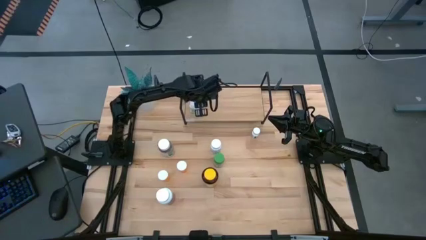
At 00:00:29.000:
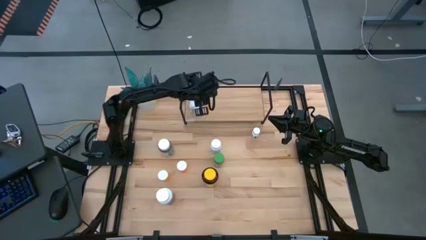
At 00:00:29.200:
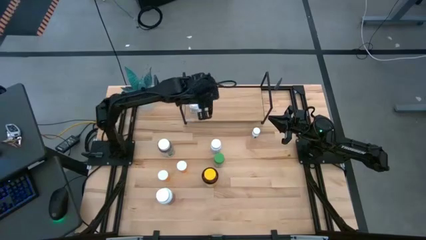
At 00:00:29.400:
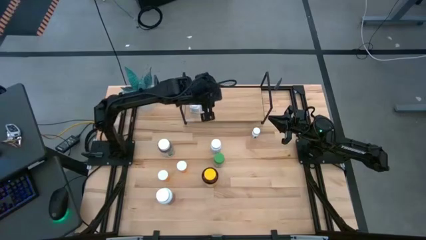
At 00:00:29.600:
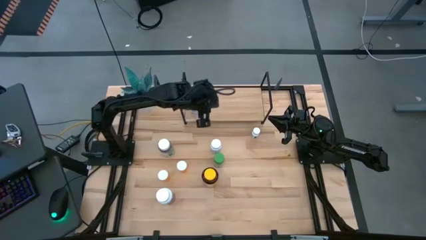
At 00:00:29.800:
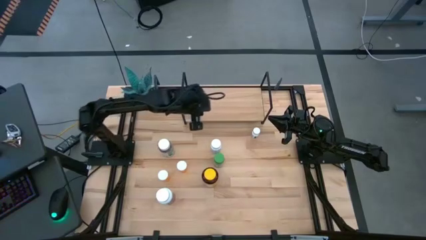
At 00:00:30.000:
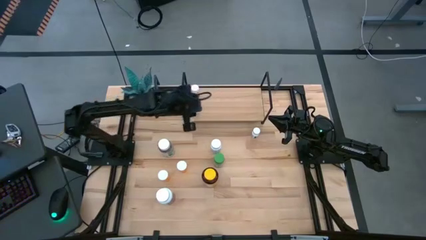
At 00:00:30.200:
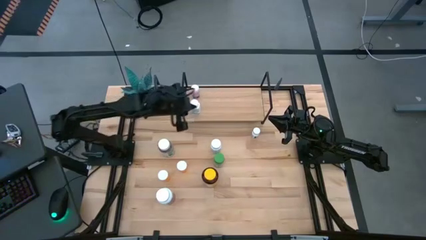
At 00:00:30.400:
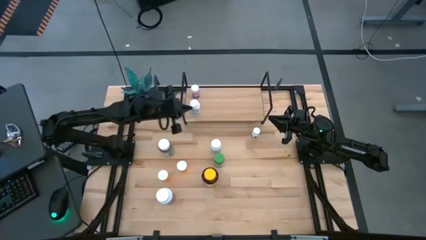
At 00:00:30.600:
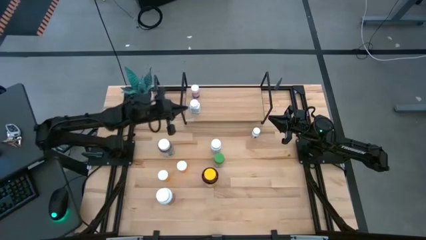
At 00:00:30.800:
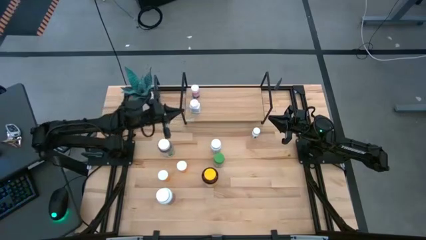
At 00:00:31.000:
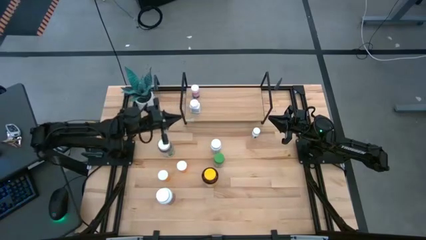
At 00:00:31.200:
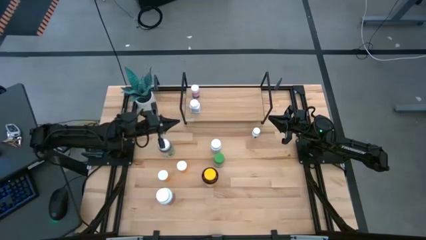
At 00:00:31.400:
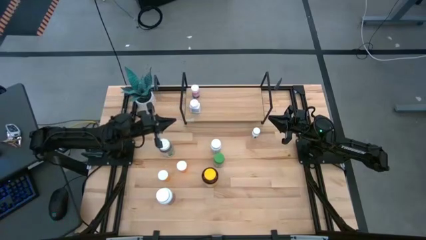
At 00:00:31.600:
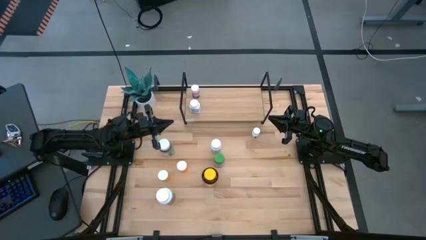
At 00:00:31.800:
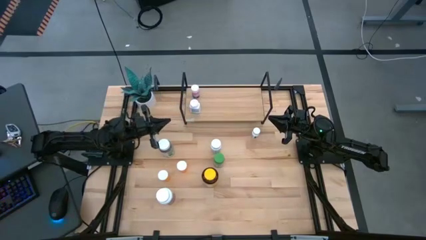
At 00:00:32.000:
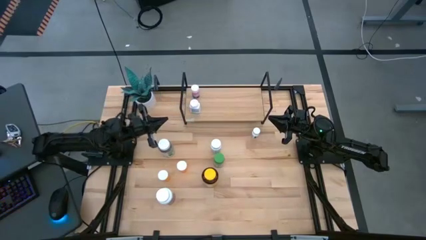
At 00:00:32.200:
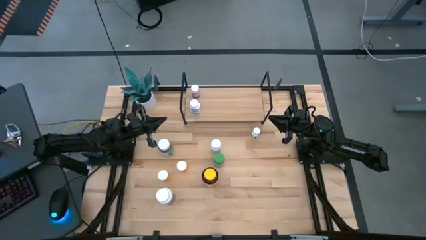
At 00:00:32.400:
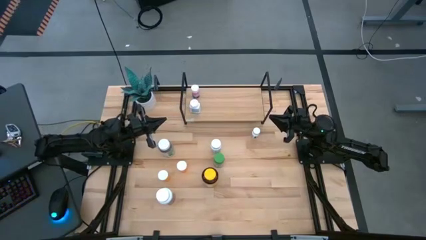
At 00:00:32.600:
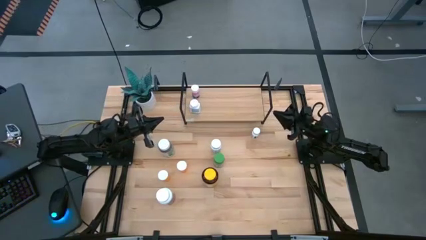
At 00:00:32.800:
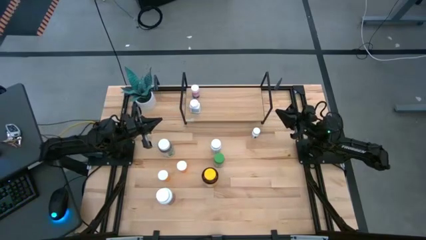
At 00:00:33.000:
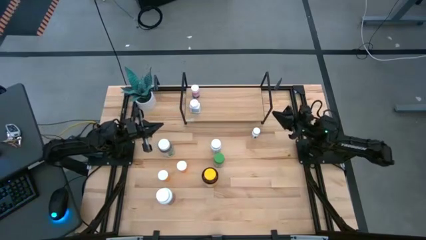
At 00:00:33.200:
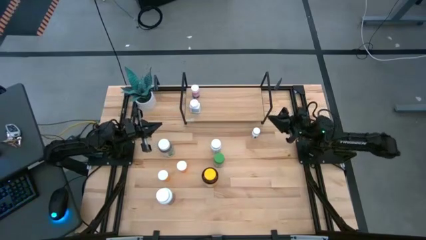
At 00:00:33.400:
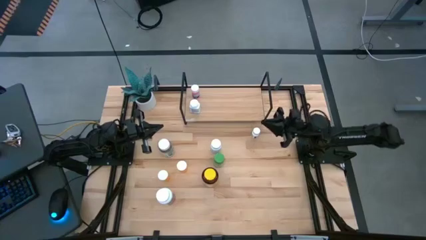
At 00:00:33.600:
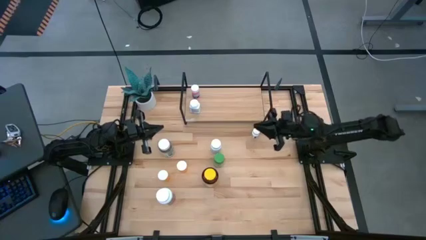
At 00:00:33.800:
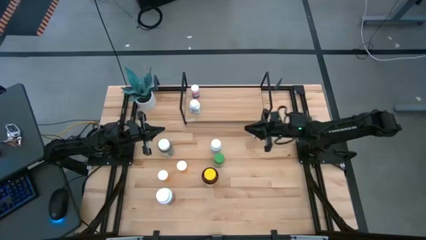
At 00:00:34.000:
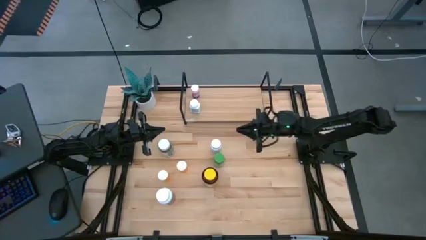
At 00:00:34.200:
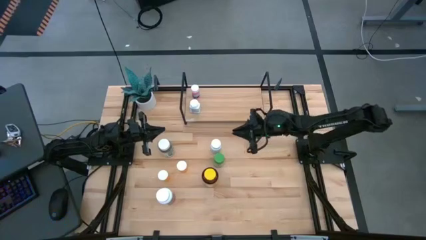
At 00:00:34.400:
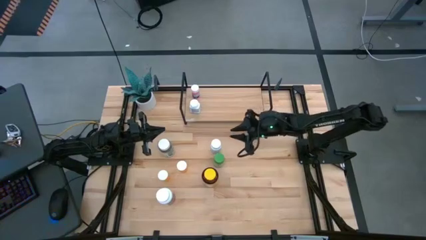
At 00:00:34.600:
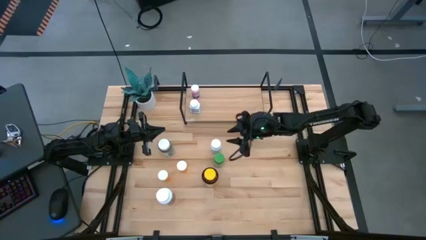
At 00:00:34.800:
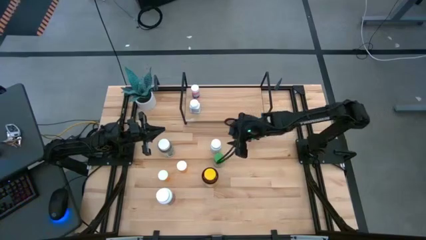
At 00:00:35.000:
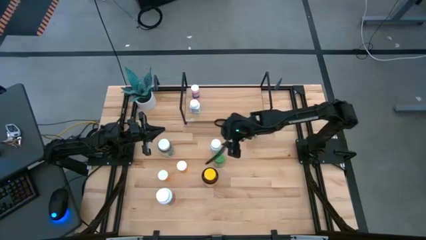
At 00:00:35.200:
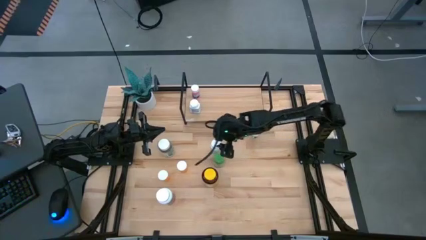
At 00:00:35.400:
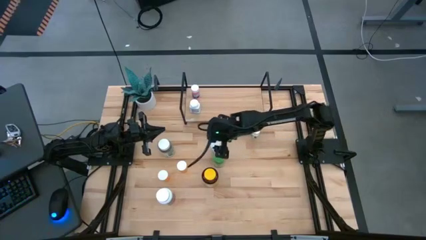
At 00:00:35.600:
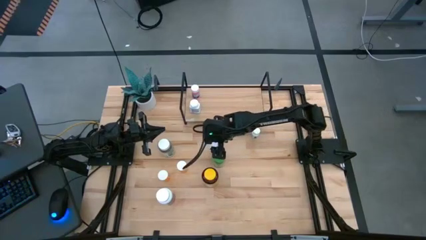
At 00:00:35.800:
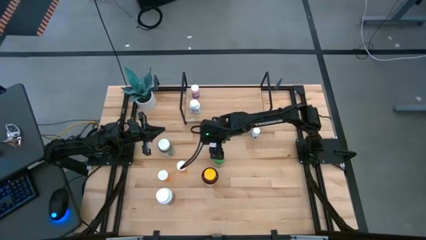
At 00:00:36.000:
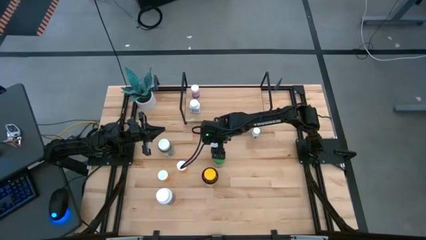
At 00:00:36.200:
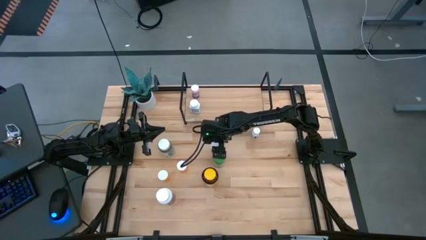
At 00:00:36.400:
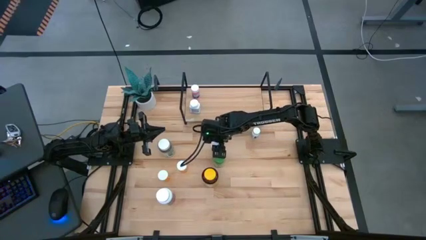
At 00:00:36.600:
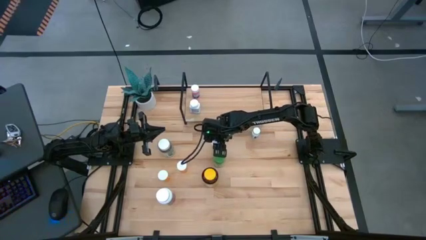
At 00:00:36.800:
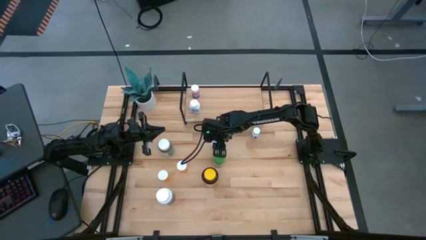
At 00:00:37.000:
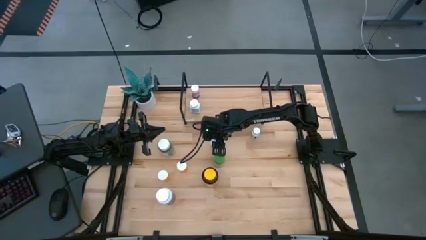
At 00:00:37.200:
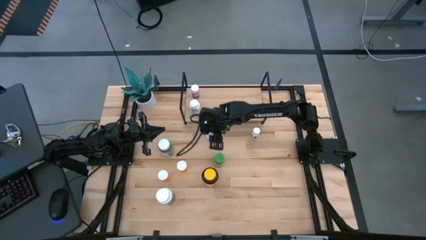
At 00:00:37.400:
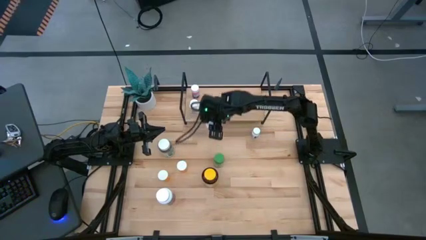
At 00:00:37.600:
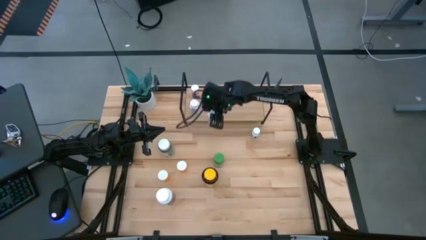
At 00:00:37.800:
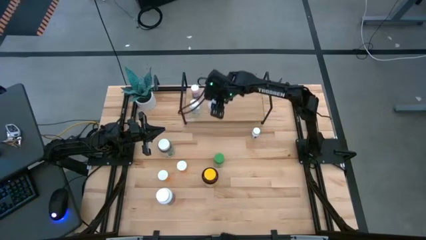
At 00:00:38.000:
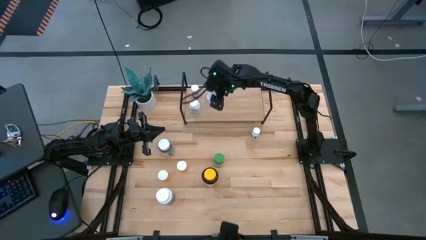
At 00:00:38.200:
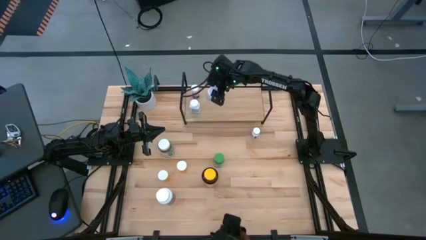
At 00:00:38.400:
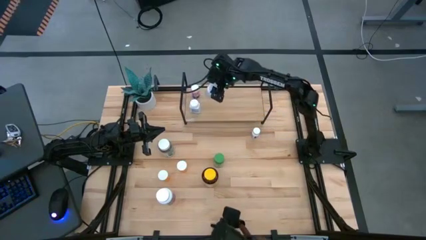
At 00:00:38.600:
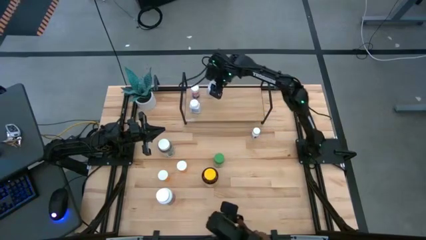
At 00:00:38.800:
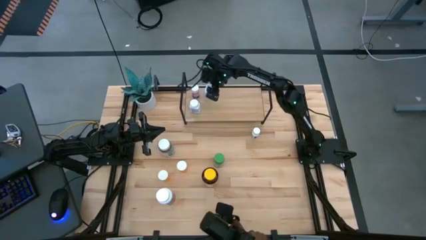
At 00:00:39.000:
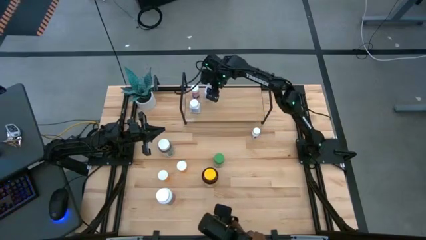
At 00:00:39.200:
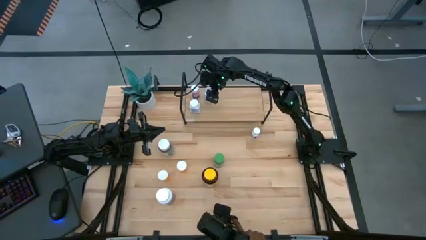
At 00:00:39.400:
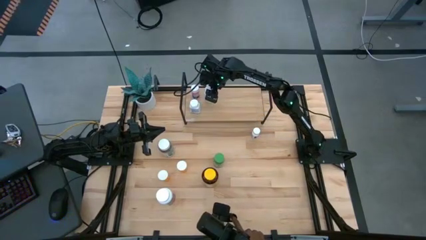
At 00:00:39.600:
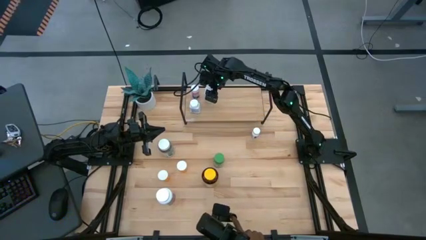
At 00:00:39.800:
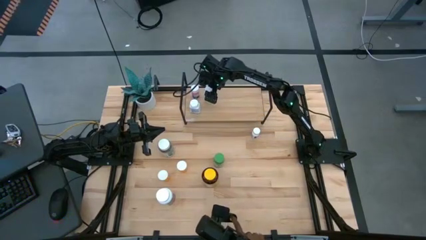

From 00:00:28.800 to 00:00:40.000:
Task: Pick and place medicine bottles onto shelf by color
Put the medium white pill bottle on the shelf

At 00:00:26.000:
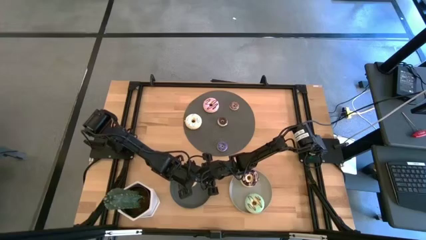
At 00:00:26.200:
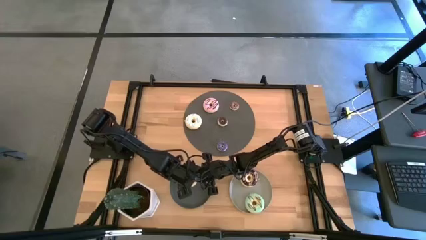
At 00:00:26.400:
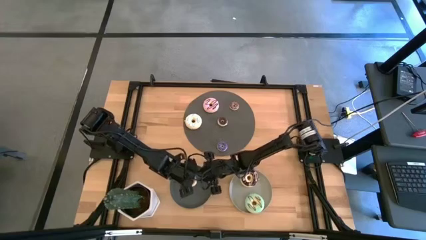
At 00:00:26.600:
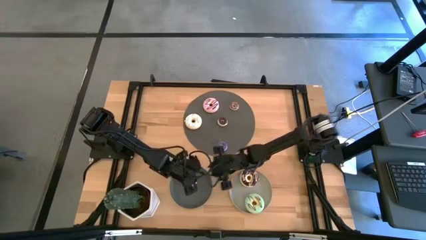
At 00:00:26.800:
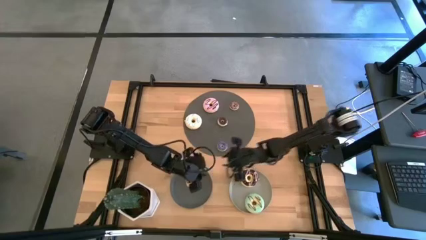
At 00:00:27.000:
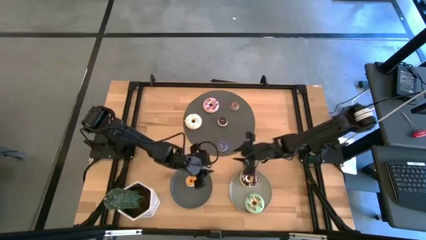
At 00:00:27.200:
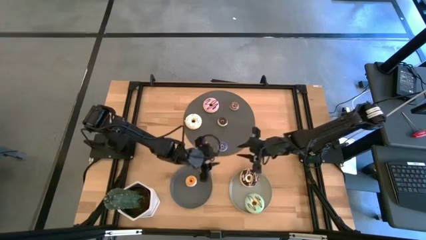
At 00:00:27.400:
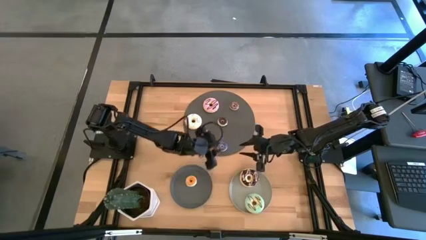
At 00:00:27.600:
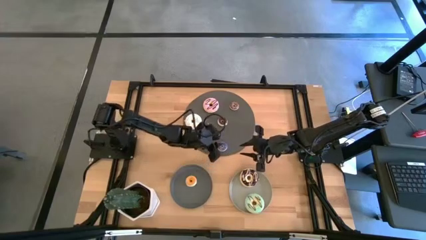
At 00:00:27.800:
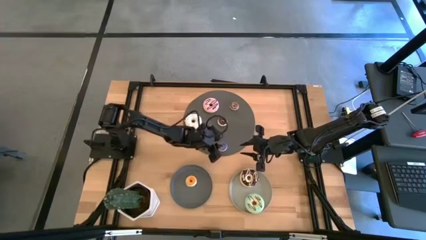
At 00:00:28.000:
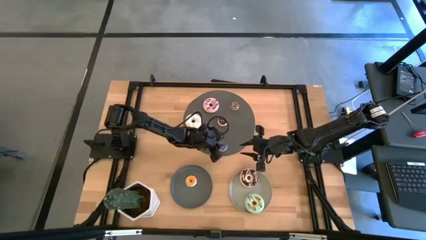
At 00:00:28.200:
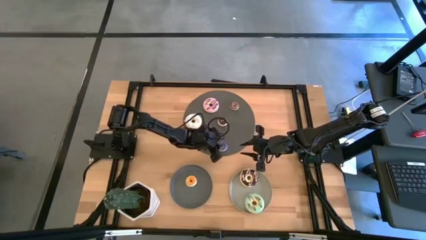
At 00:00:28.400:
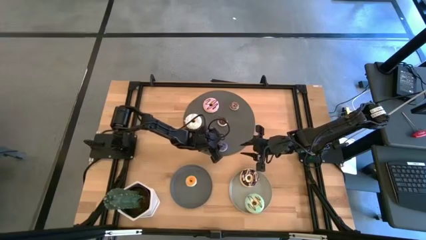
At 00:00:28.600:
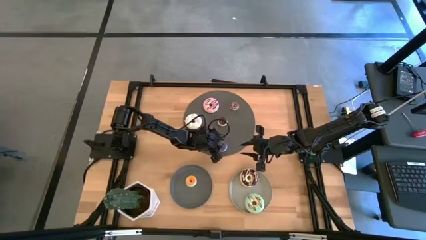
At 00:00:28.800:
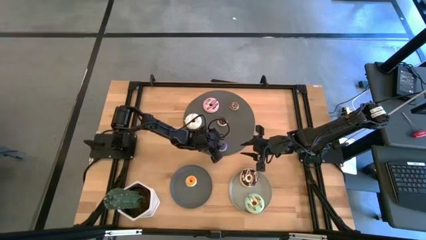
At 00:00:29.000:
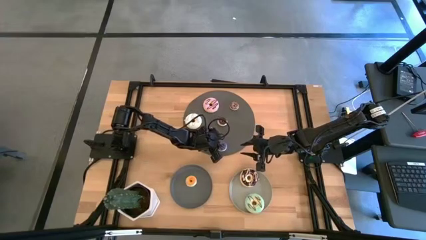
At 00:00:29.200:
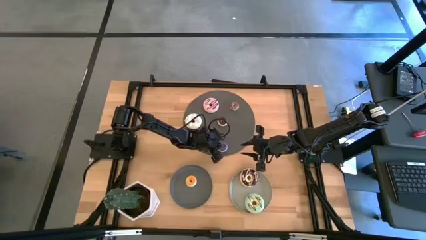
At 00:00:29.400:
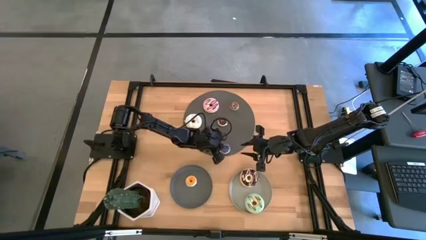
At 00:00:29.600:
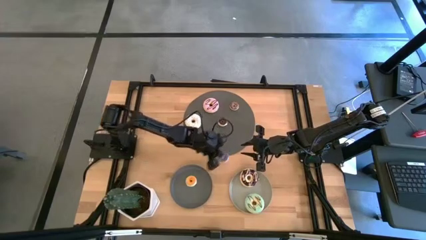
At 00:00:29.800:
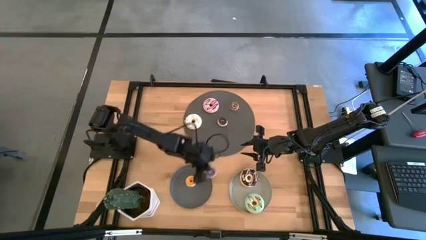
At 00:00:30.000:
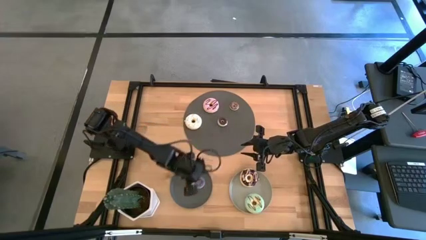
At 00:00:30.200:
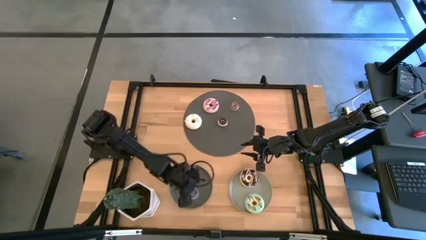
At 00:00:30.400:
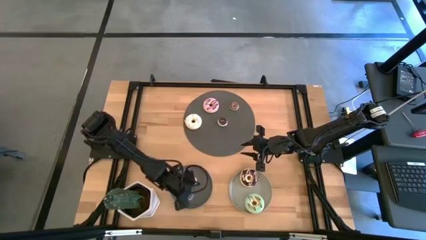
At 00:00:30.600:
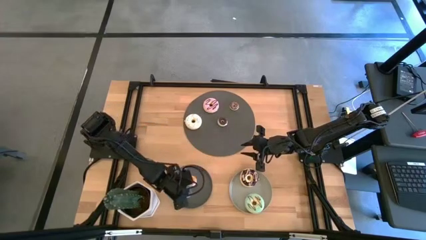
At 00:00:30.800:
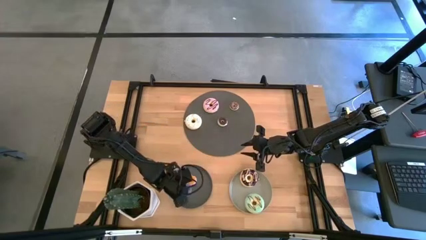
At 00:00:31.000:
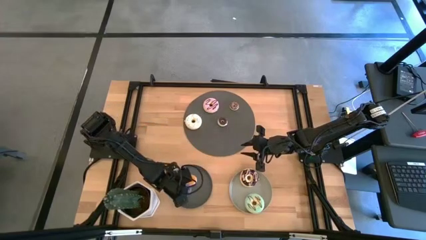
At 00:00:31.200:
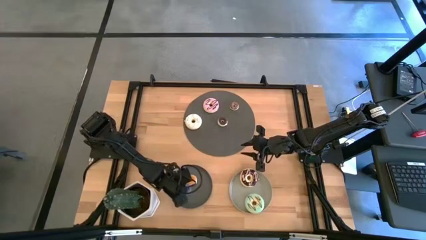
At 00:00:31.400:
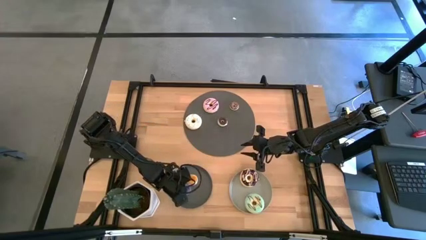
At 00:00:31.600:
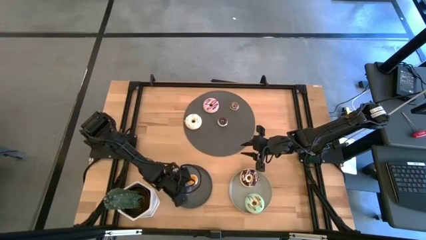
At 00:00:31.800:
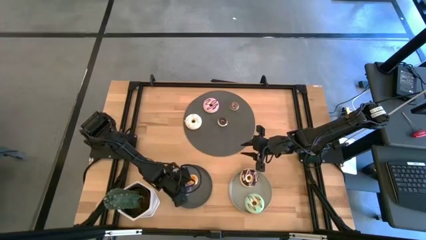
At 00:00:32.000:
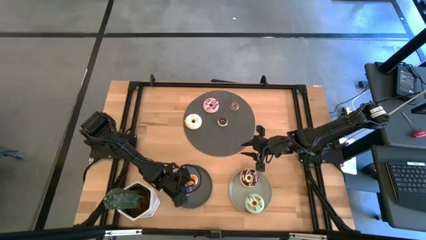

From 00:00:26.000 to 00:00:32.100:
Task: Pick & Place donuts
Put small purple donut on the black plate
